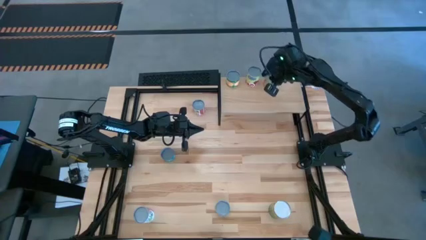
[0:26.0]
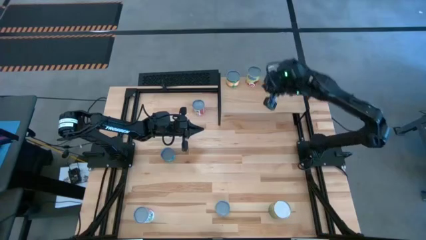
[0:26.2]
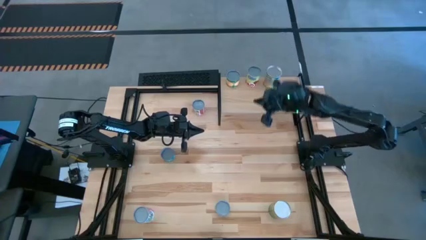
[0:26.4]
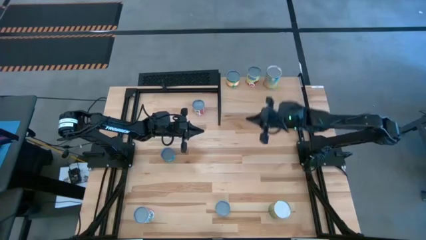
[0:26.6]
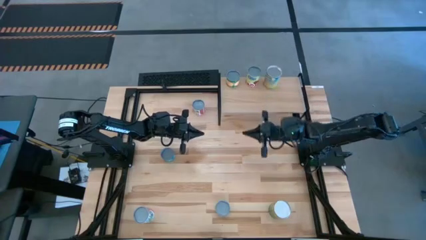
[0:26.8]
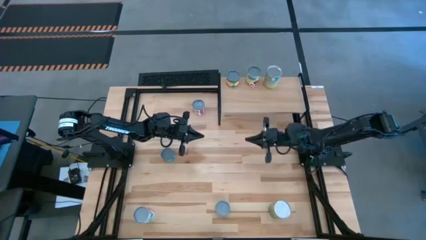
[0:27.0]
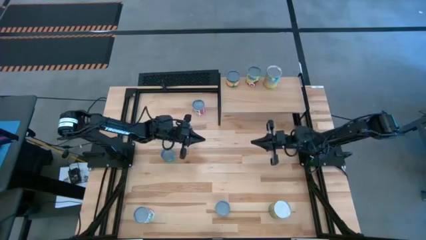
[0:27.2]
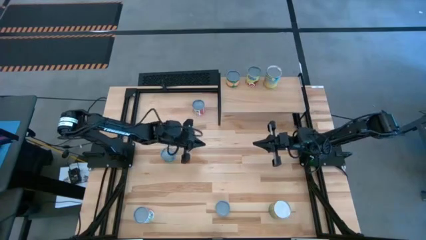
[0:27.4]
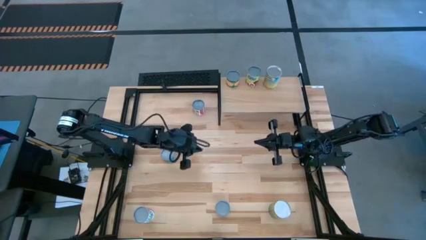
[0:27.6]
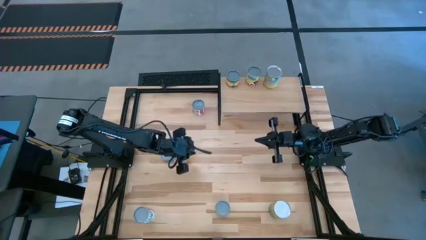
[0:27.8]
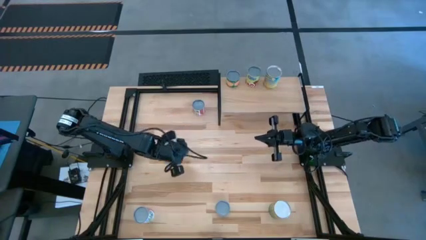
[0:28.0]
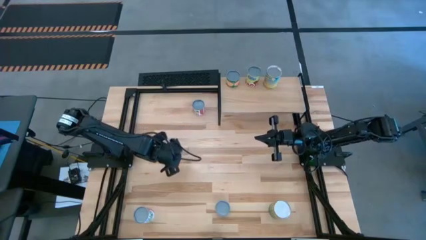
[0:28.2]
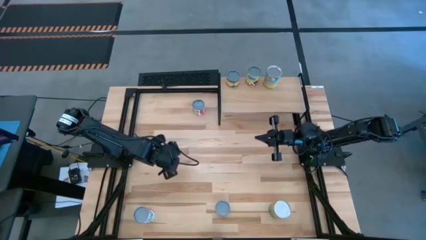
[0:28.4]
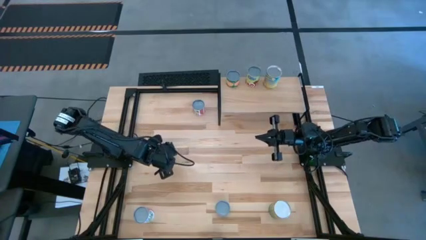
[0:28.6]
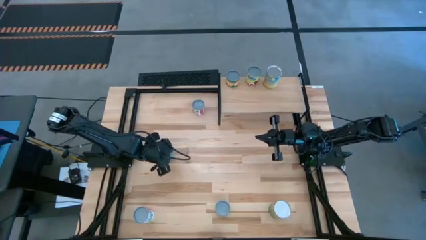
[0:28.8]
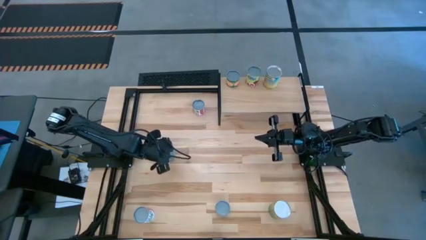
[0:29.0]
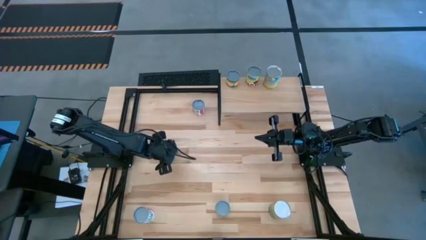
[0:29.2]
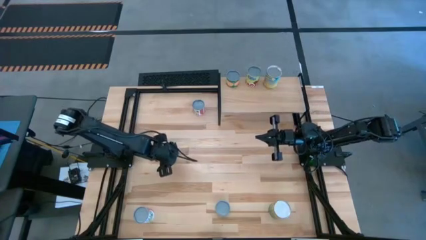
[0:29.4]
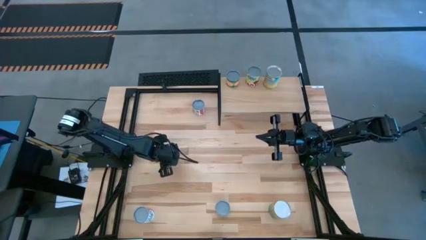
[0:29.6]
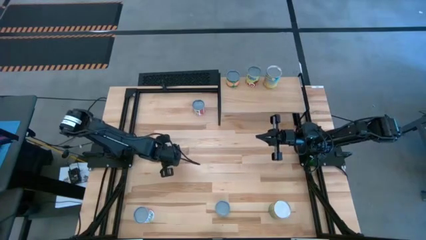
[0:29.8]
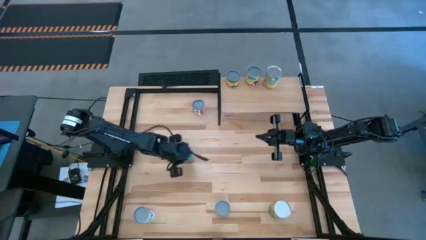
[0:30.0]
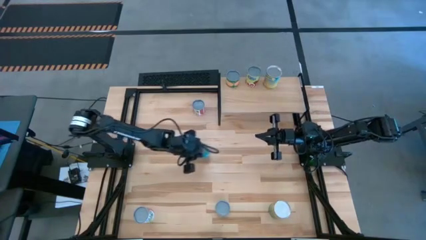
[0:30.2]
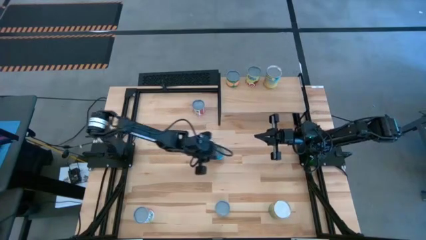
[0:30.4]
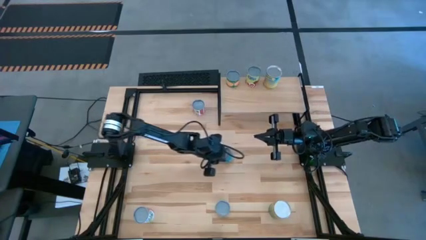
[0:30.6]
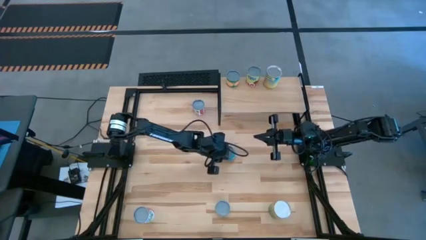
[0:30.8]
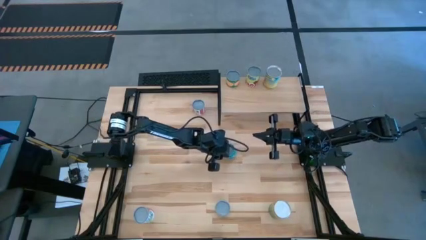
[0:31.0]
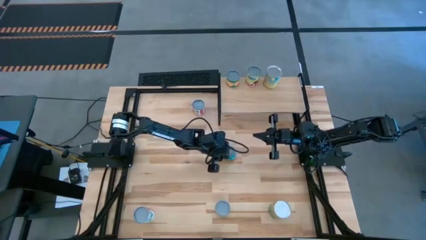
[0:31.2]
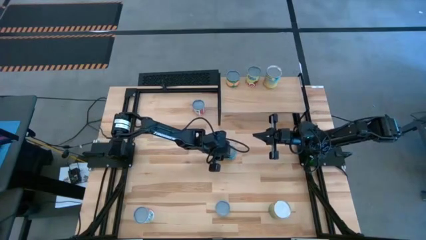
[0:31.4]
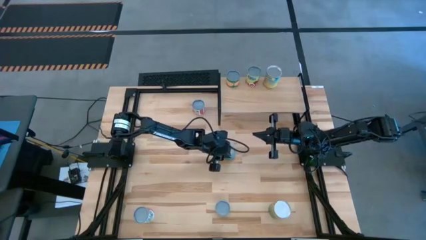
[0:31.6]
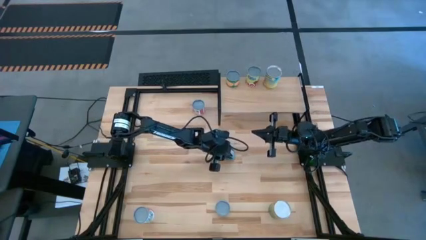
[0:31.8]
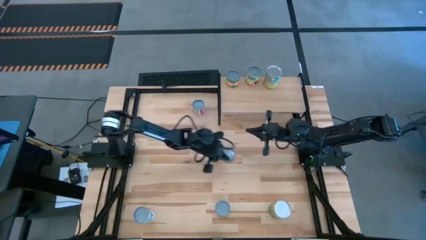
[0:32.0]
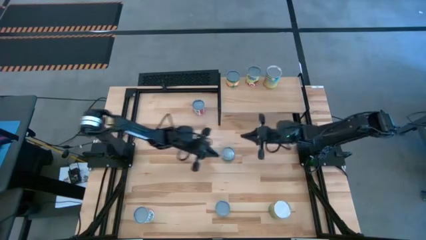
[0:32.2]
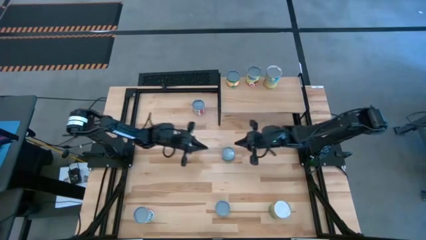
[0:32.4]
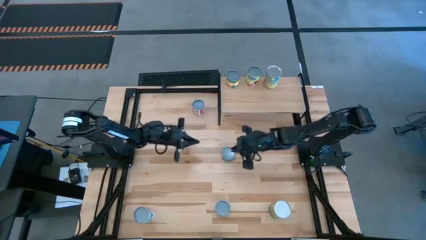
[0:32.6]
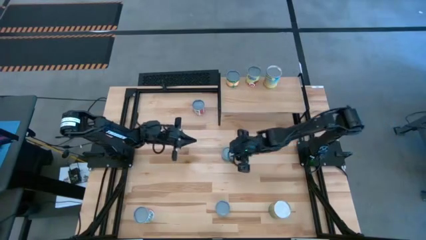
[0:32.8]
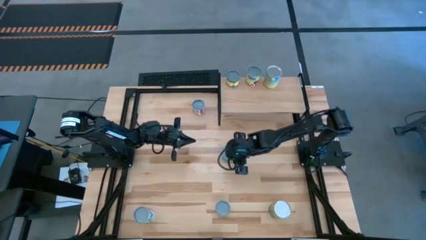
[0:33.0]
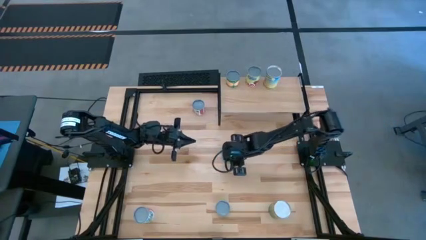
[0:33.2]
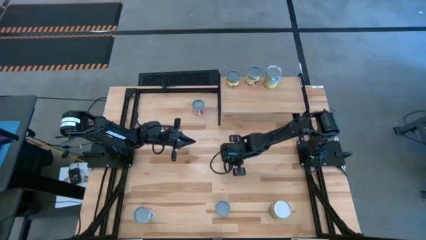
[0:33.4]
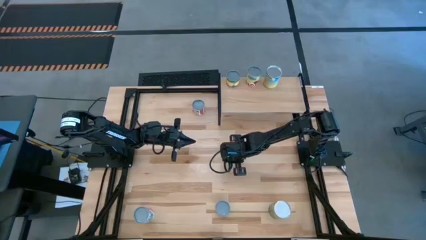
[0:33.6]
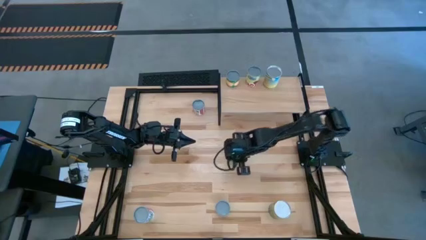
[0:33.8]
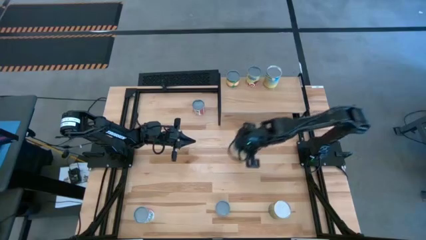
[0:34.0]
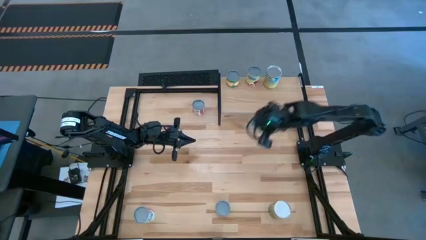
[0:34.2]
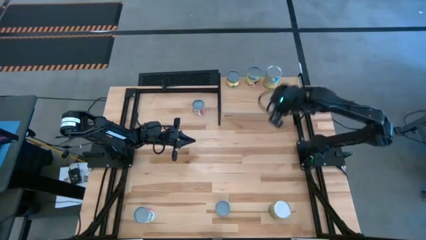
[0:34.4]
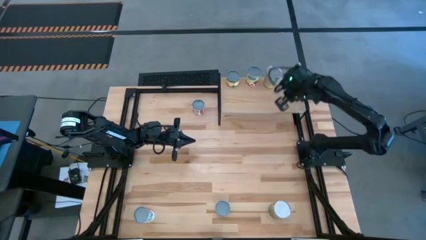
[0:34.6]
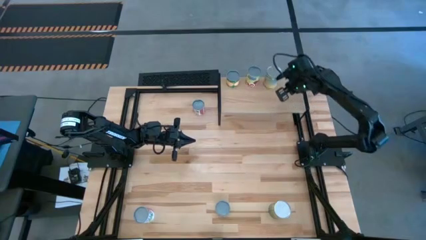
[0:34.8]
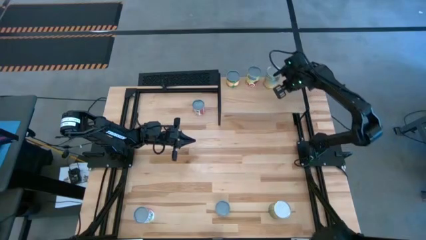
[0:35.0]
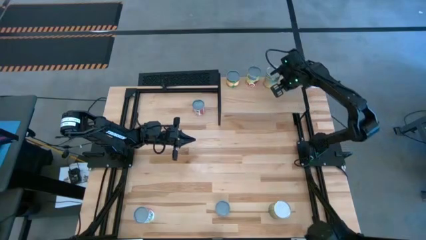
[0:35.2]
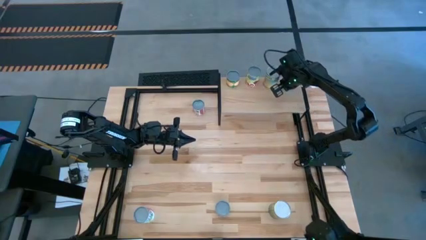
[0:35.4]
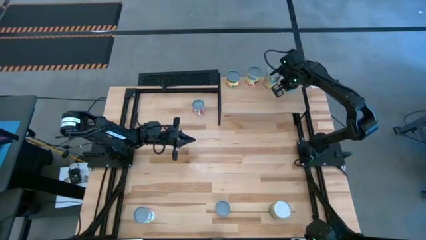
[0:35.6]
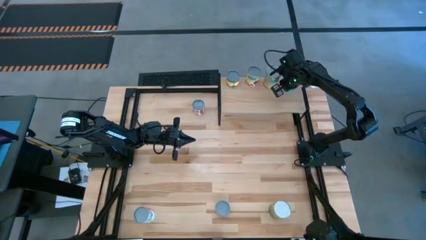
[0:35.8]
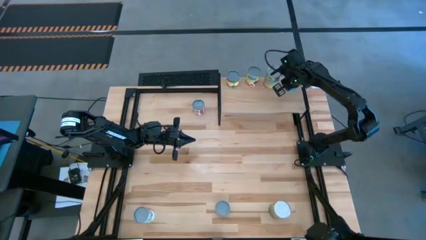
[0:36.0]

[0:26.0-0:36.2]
Task: Pick and place cans onto a shelf
Put the canned tuna on the shelf

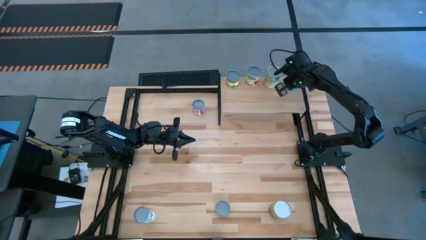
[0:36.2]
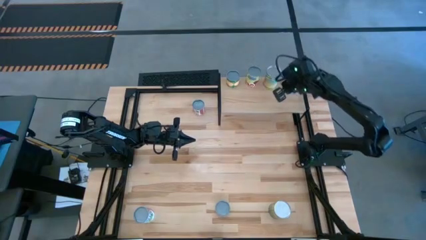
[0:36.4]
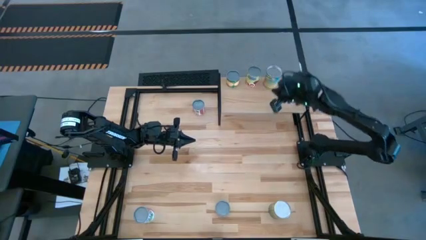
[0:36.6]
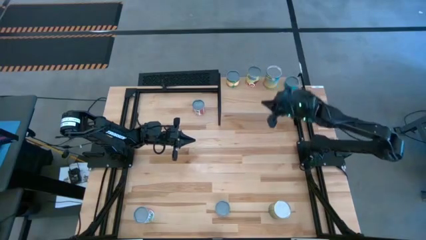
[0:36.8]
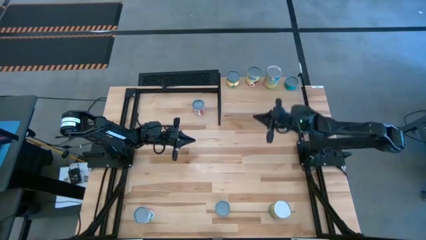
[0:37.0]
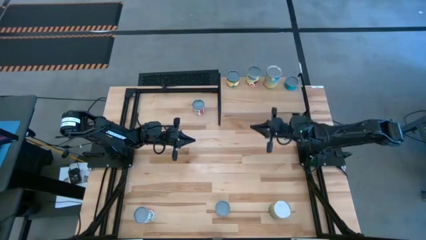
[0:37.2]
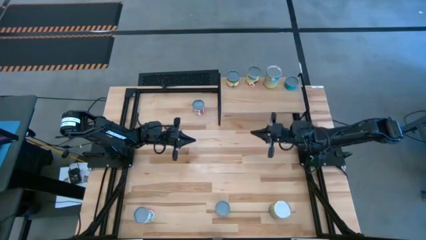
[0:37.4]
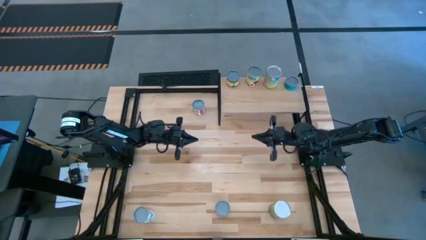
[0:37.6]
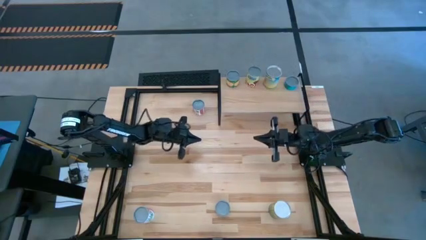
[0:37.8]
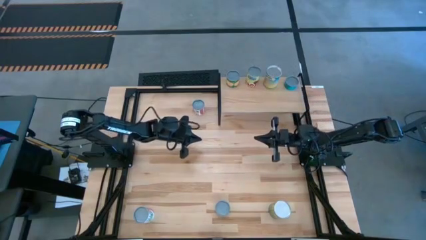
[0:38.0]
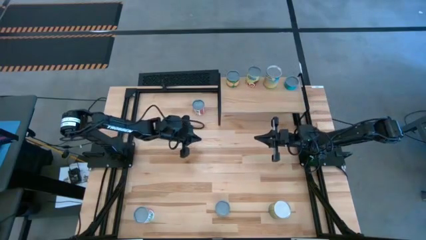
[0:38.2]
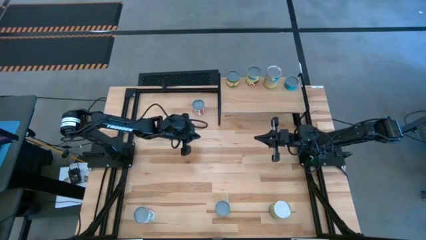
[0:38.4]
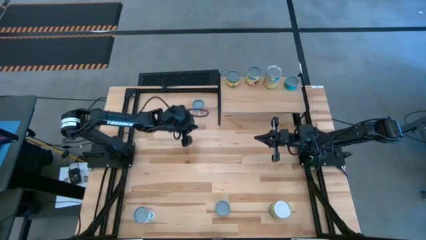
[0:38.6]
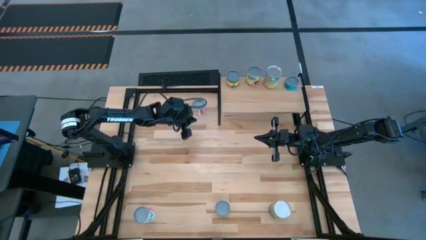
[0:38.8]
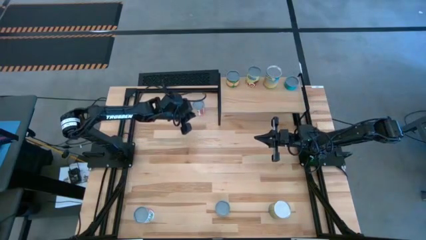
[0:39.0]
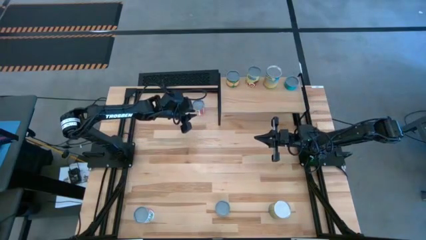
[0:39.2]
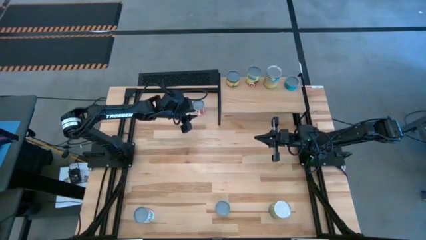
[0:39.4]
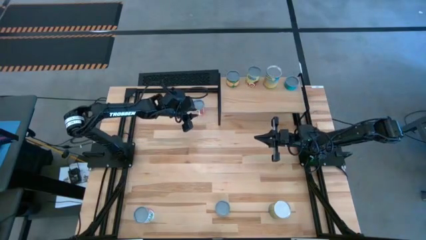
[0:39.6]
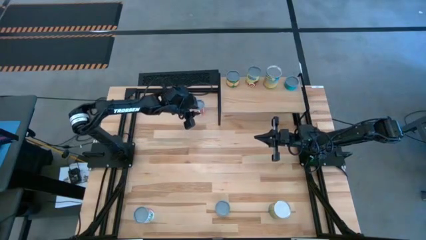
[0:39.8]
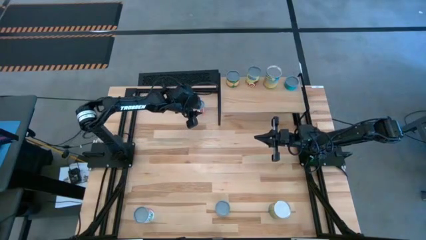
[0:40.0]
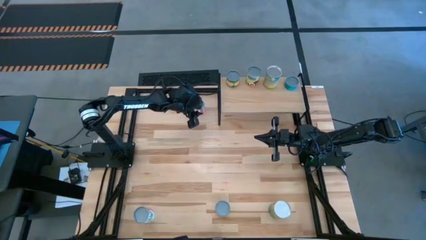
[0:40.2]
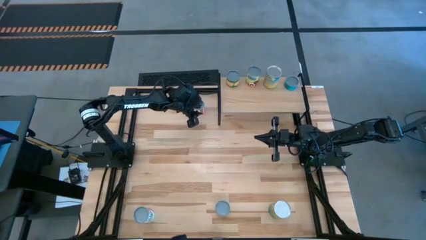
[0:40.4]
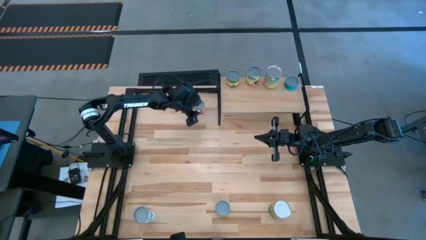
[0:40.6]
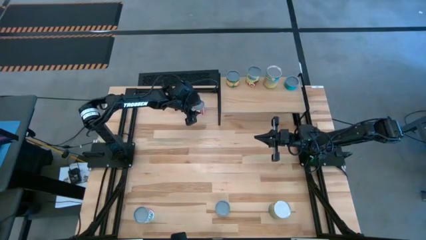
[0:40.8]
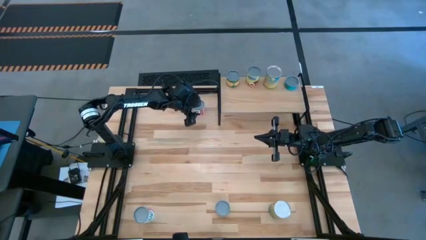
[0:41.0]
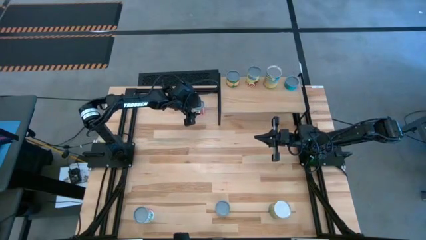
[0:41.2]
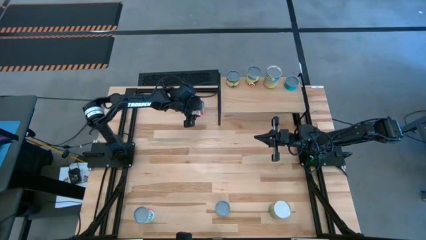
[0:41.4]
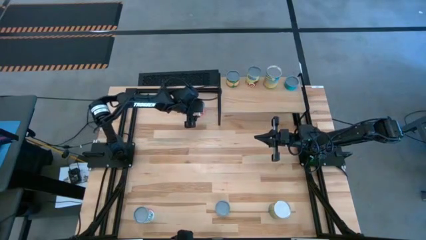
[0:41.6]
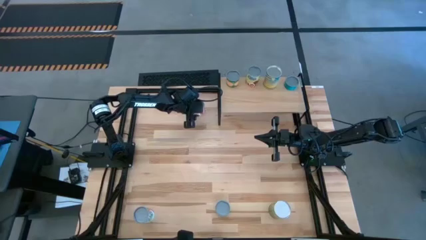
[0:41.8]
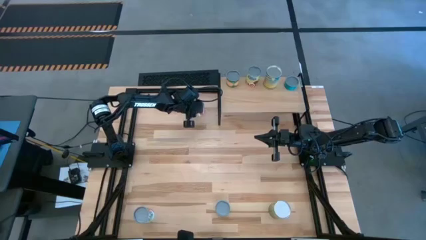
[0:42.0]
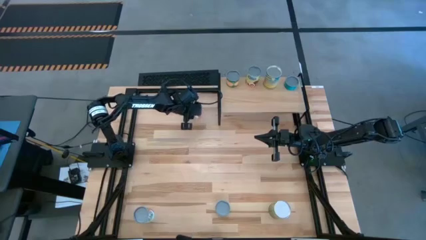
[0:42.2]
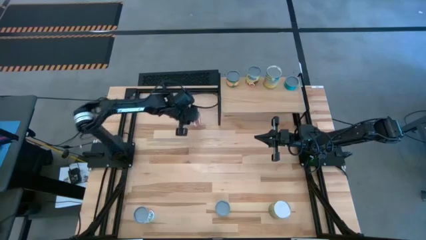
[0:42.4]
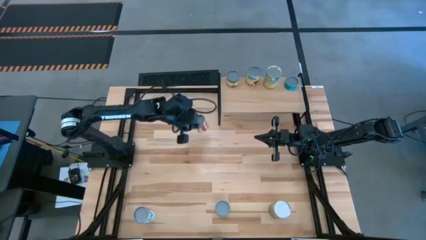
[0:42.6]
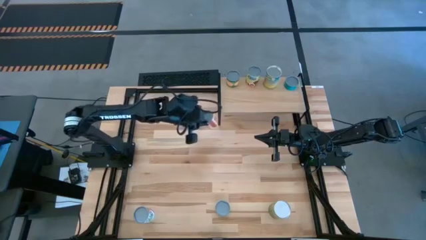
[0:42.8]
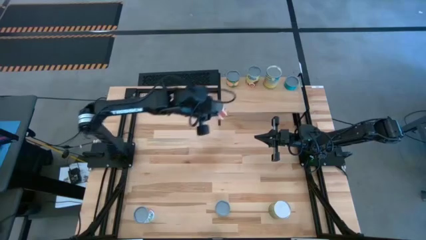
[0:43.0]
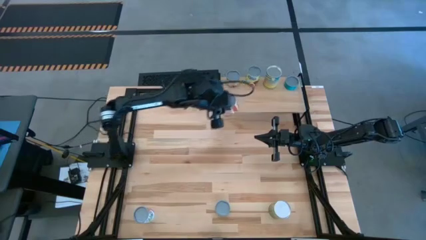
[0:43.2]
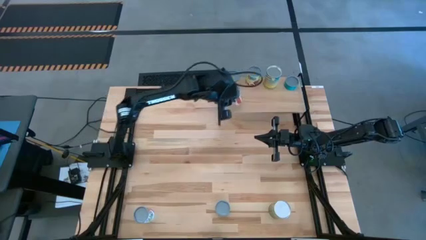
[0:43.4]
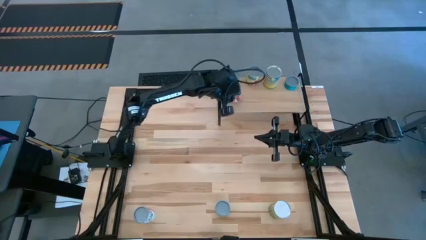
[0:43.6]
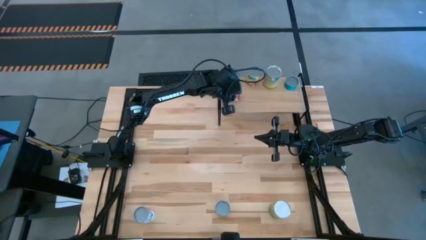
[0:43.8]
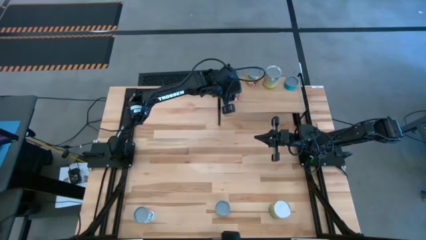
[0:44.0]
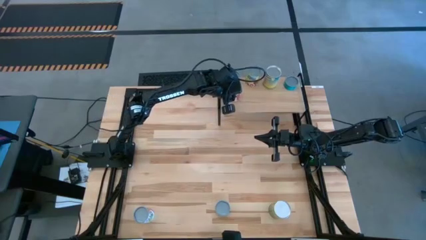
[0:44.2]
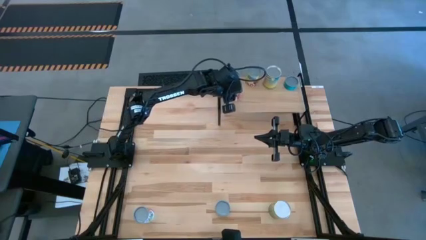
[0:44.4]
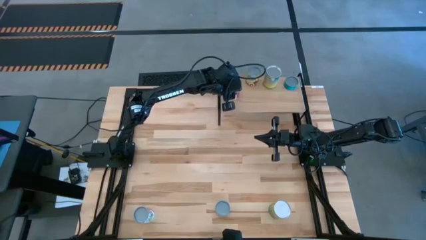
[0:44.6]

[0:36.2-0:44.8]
Put the canned diced tomatoes on the shelf
